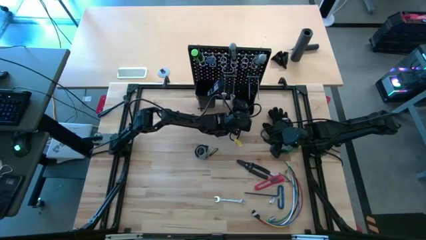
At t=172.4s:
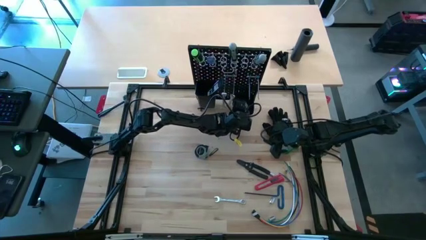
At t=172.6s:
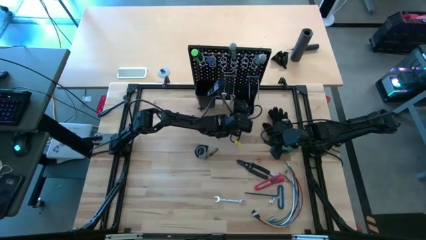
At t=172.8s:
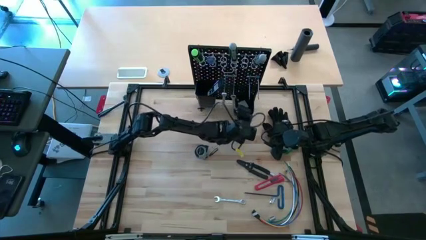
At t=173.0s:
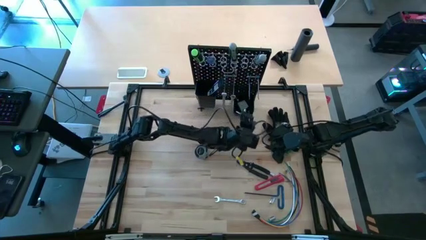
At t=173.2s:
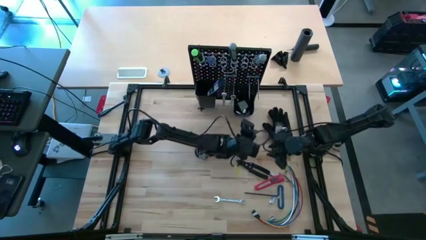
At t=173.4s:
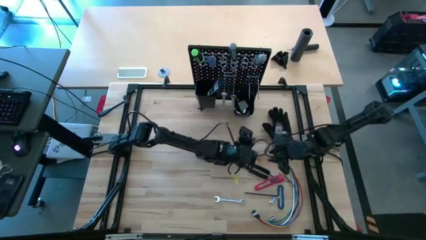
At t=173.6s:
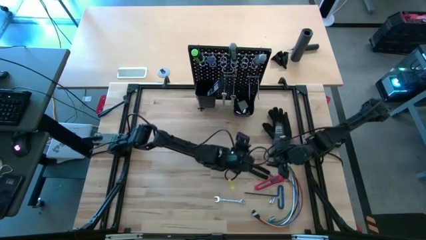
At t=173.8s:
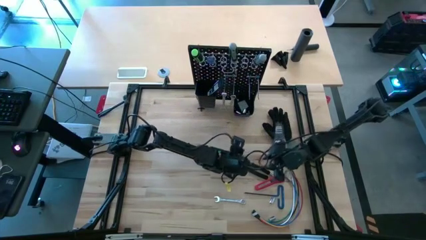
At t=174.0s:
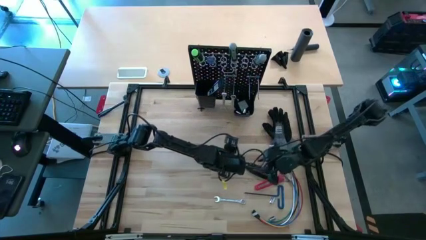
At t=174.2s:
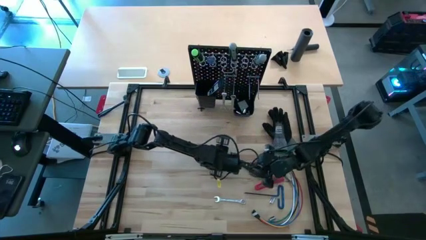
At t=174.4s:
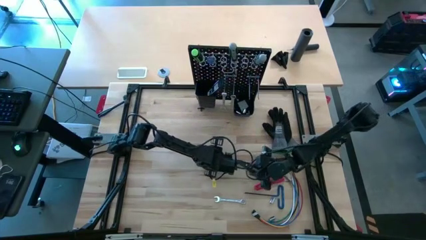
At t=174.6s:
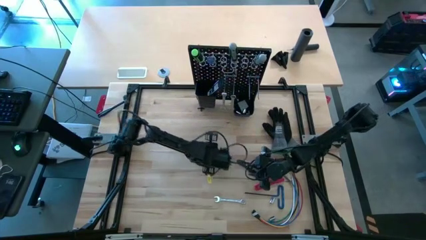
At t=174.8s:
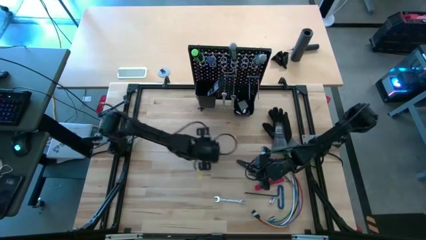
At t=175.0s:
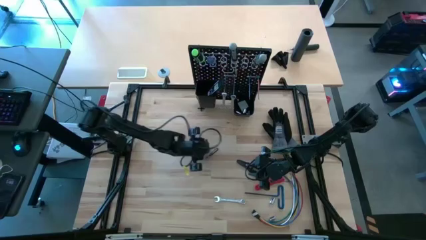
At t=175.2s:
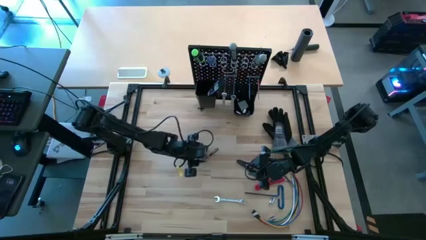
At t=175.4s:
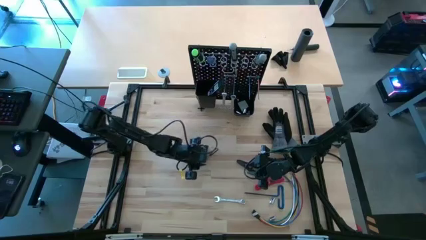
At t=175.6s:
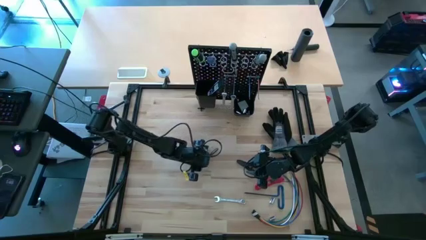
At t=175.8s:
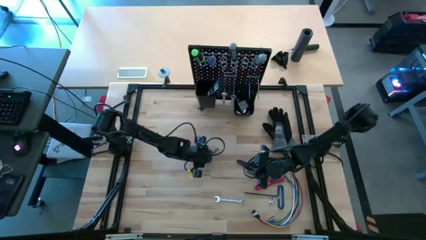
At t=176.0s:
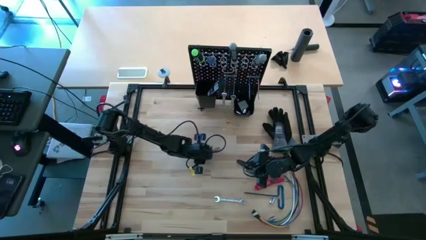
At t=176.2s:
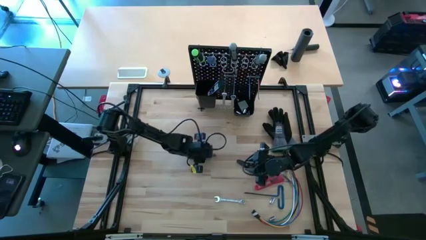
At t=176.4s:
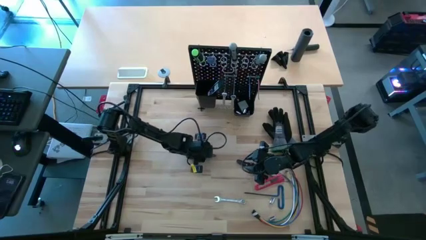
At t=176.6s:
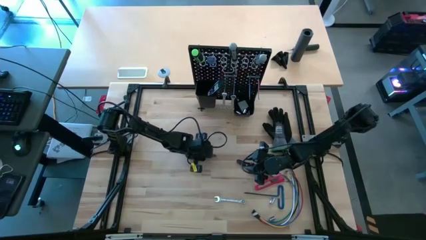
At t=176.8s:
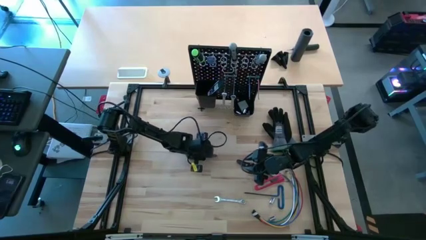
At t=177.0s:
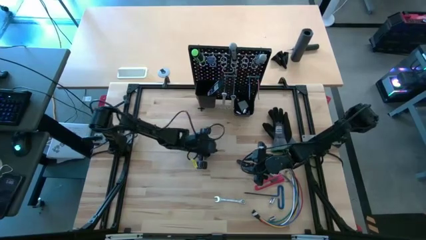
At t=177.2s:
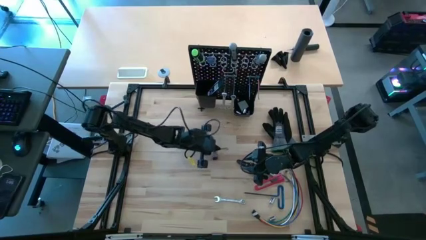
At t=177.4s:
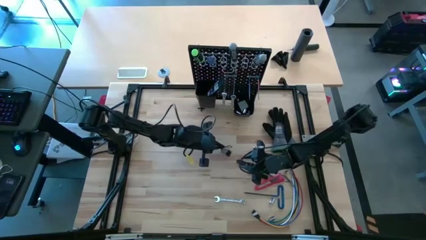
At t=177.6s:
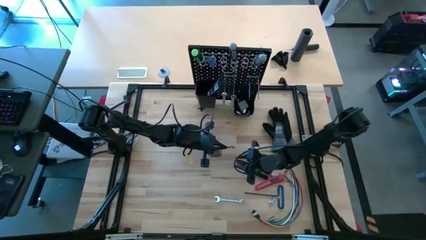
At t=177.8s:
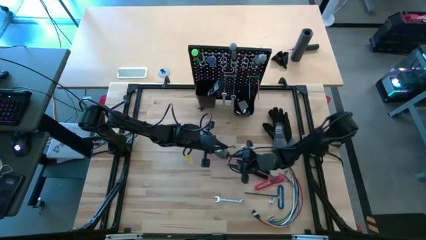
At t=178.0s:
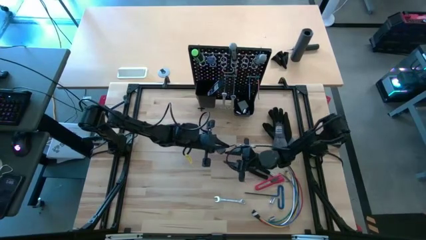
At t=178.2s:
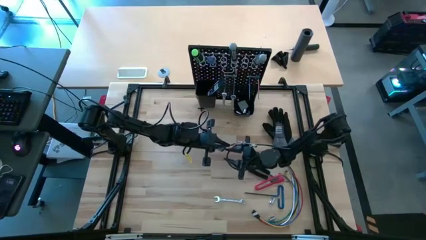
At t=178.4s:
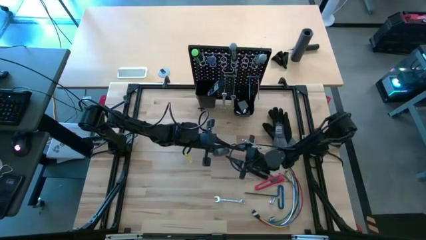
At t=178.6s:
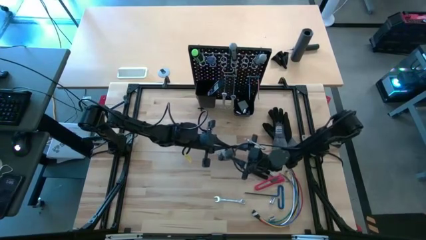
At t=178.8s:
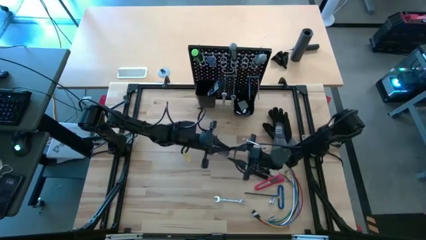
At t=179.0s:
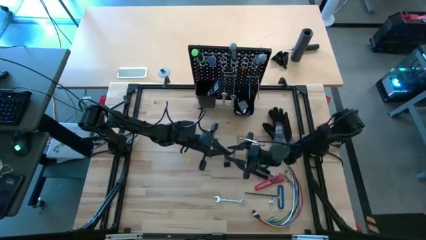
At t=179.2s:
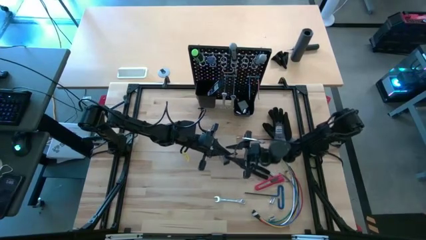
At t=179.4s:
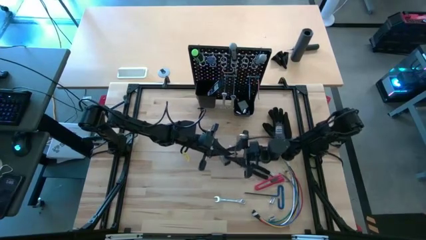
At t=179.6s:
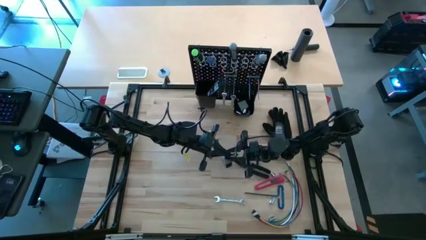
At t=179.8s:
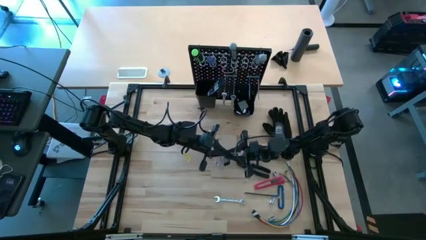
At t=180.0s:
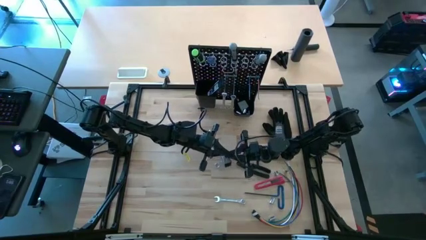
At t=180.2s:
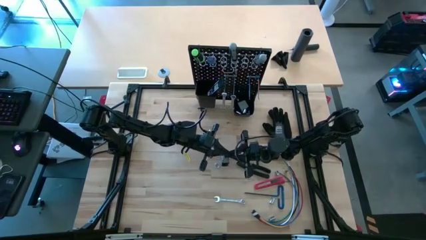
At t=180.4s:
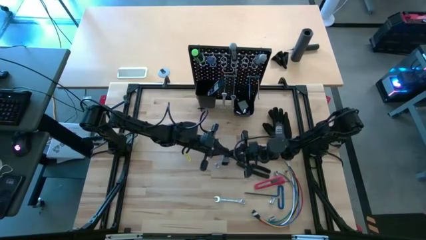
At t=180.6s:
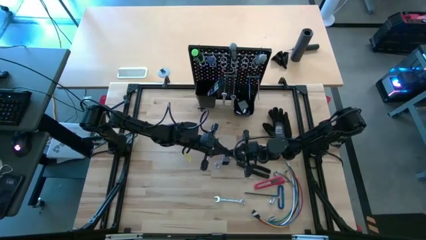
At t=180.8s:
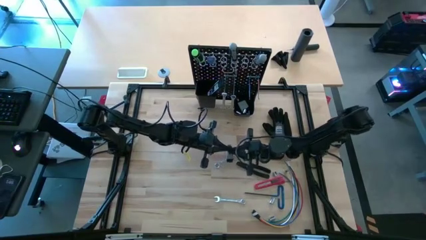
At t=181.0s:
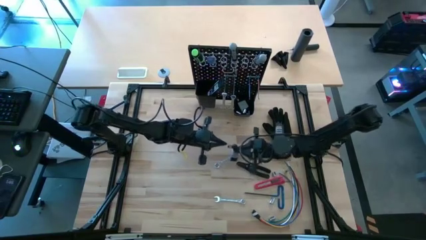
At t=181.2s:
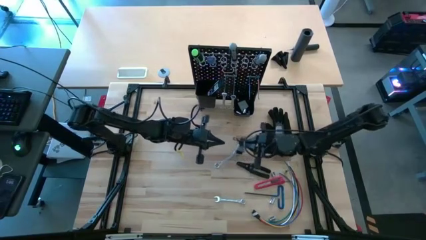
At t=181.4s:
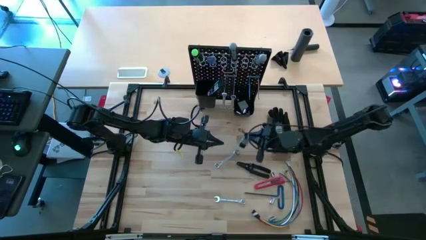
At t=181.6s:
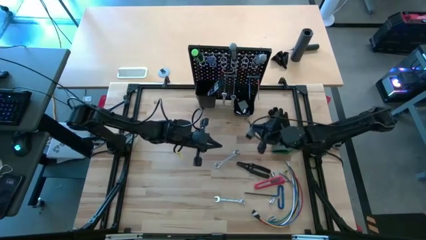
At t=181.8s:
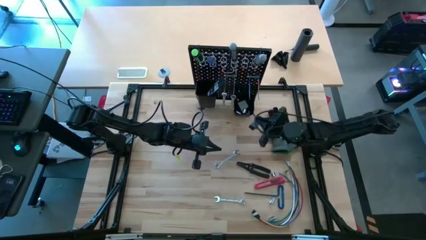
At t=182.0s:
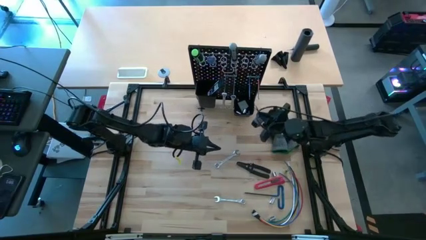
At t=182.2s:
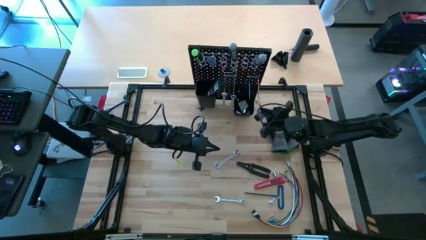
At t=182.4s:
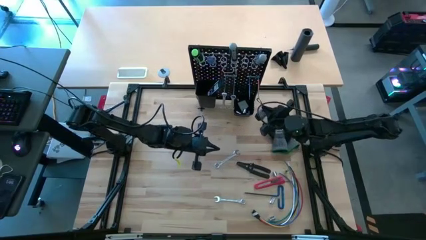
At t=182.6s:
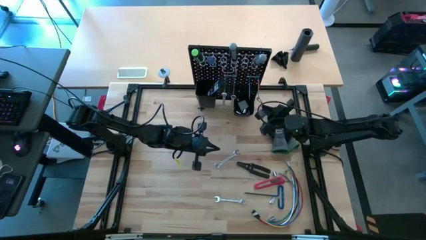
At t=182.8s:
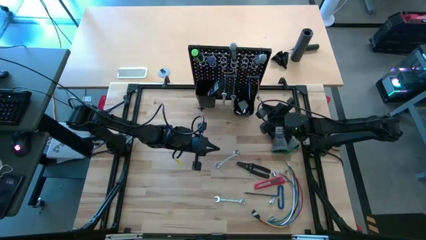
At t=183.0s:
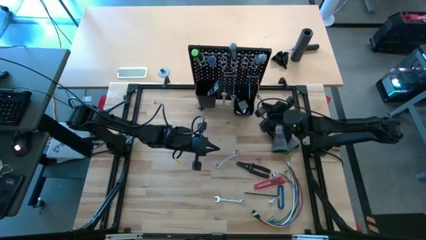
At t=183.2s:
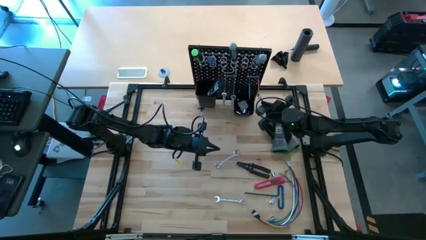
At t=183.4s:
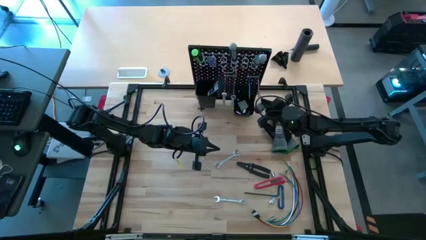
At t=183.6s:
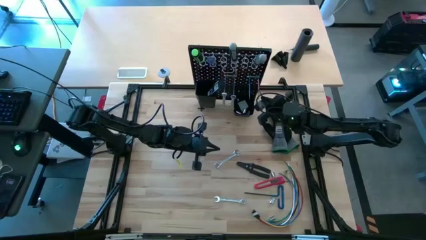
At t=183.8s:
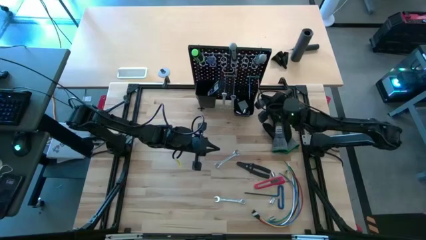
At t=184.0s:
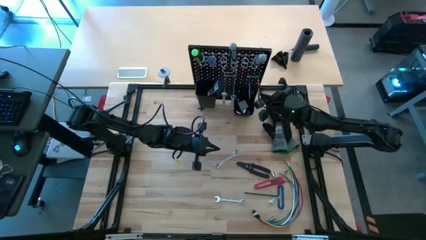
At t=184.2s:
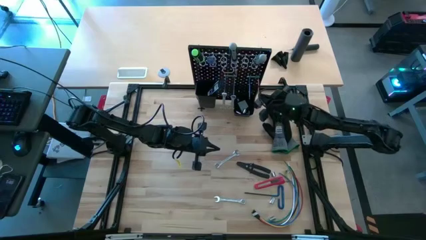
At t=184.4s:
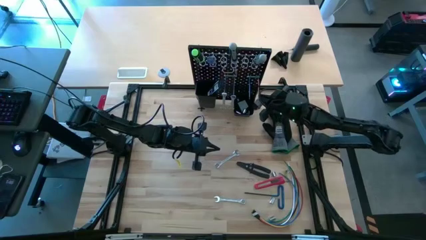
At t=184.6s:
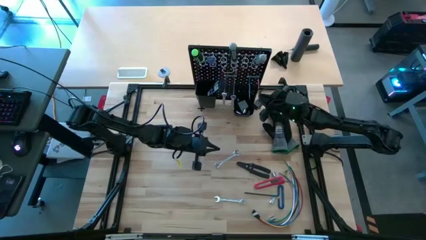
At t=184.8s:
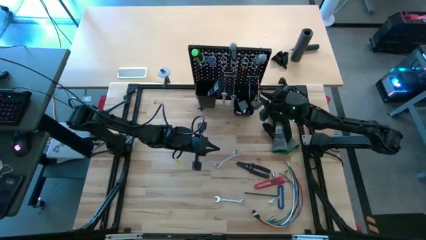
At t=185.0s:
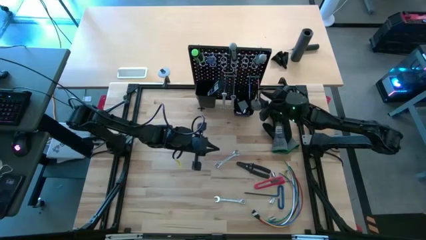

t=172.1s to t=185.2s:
Task: Hang tools onto peg board
Hang the gray tape measure on the peg board
